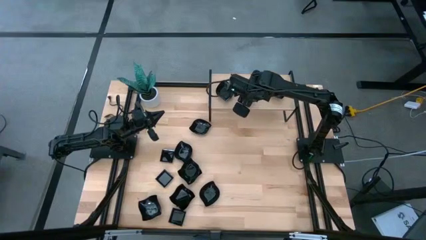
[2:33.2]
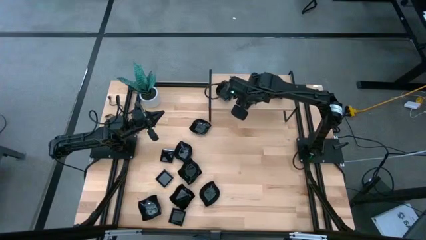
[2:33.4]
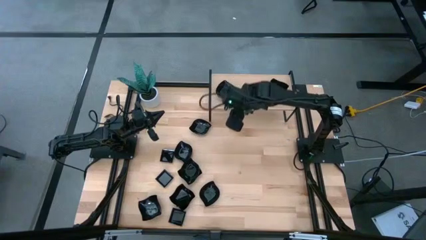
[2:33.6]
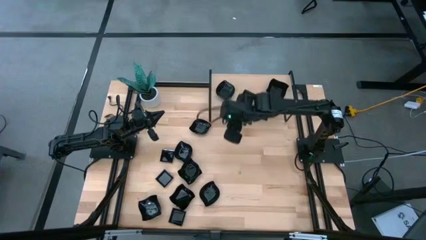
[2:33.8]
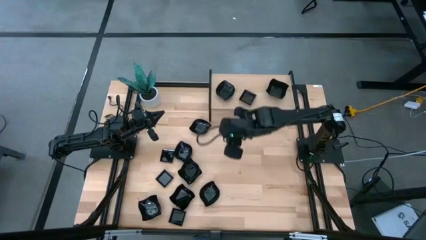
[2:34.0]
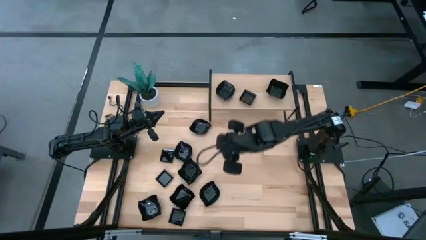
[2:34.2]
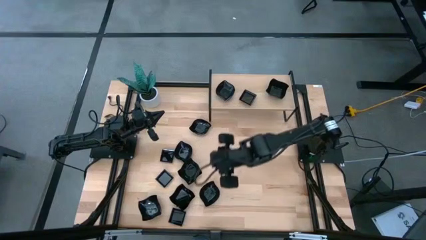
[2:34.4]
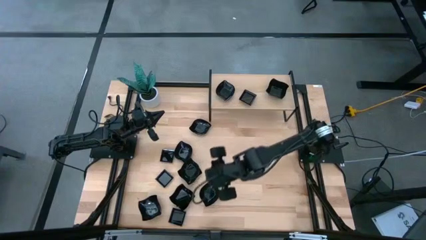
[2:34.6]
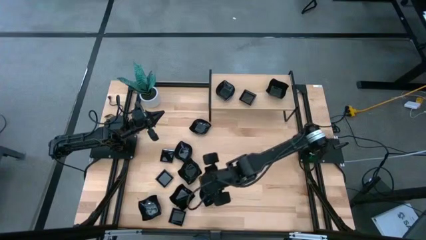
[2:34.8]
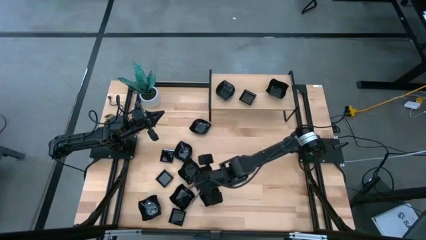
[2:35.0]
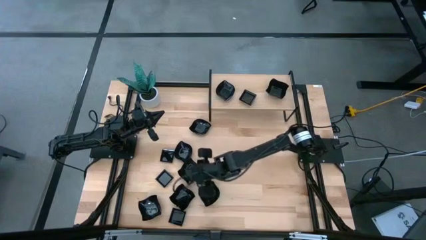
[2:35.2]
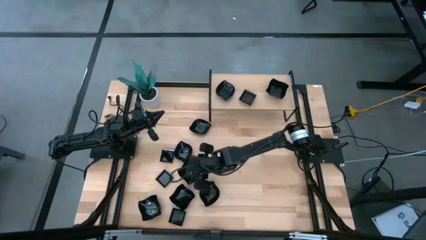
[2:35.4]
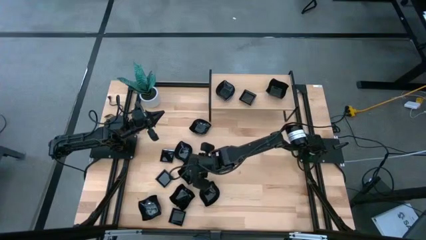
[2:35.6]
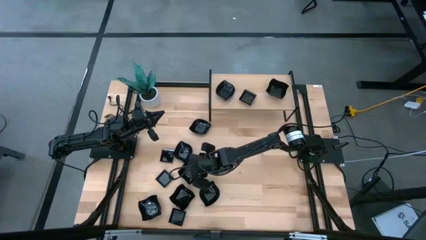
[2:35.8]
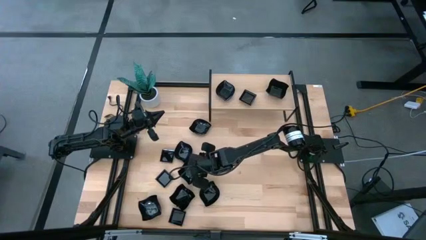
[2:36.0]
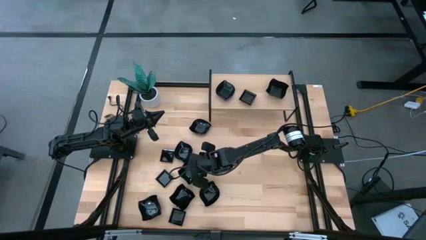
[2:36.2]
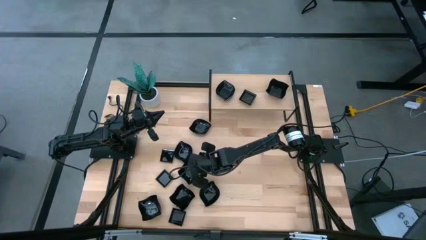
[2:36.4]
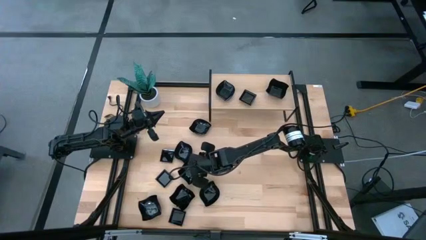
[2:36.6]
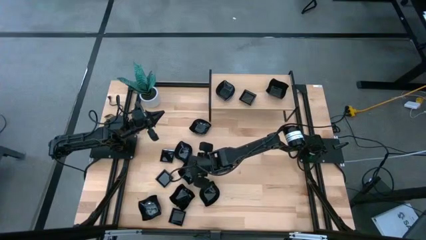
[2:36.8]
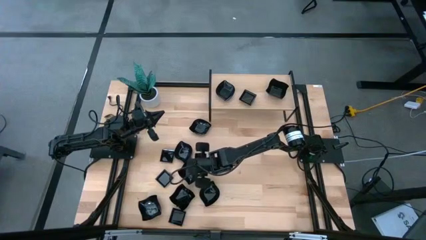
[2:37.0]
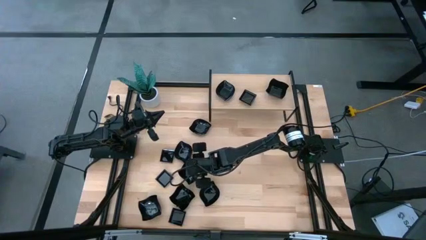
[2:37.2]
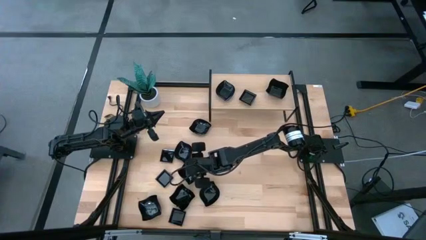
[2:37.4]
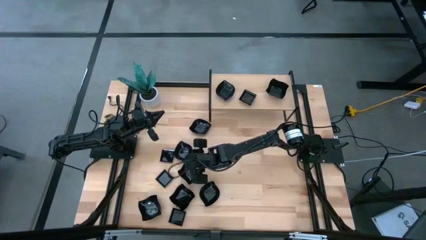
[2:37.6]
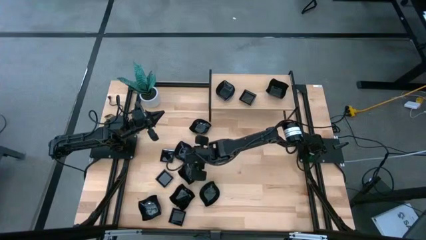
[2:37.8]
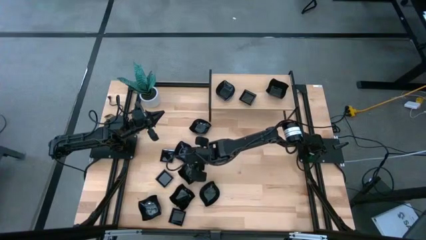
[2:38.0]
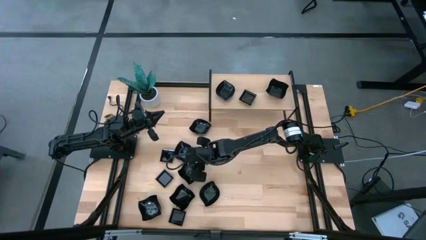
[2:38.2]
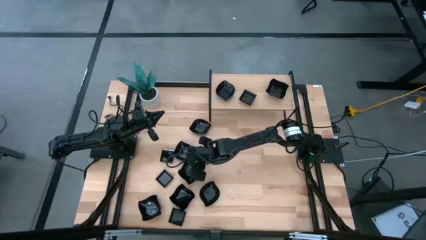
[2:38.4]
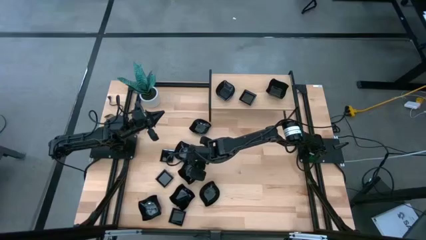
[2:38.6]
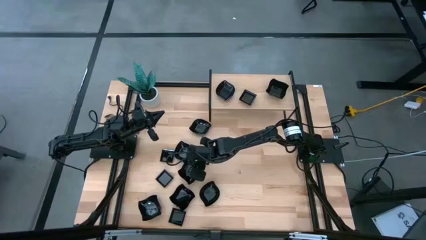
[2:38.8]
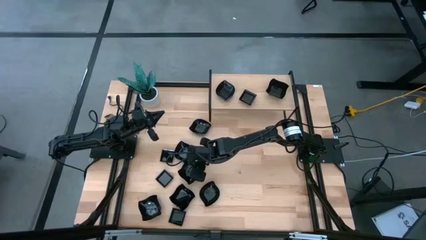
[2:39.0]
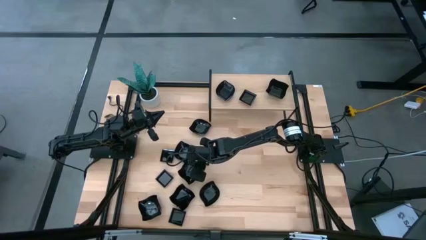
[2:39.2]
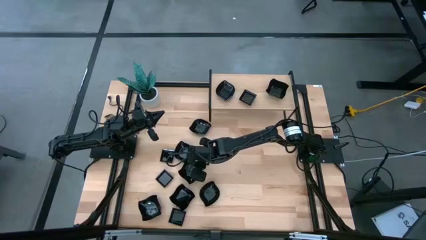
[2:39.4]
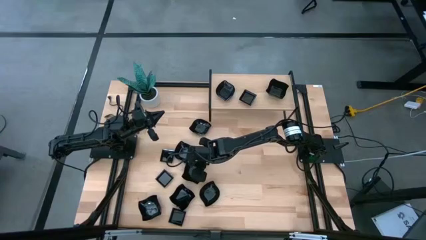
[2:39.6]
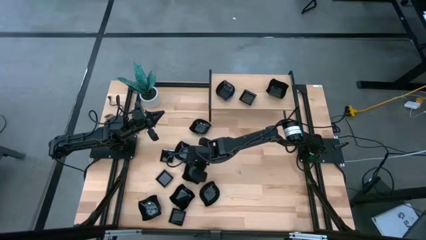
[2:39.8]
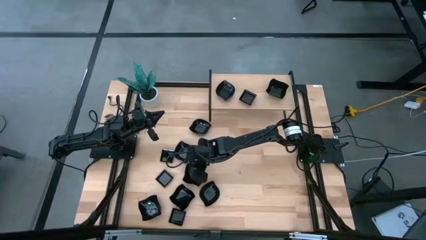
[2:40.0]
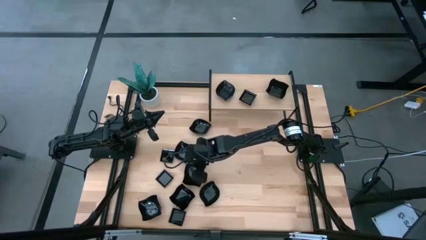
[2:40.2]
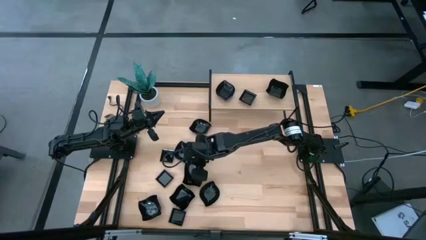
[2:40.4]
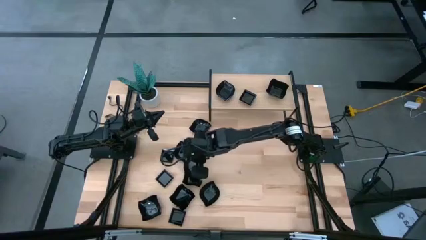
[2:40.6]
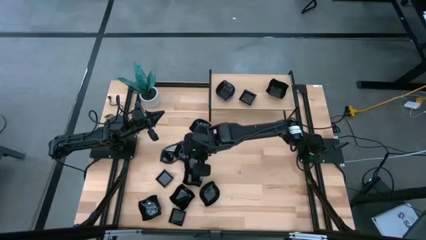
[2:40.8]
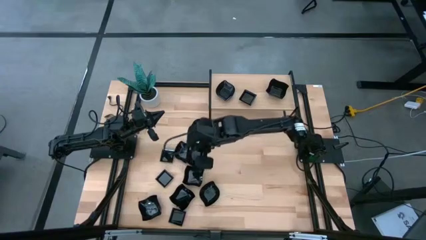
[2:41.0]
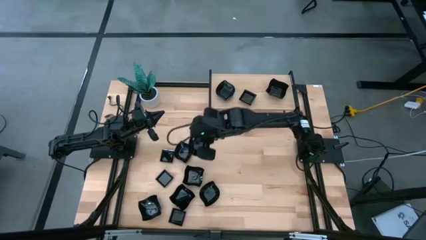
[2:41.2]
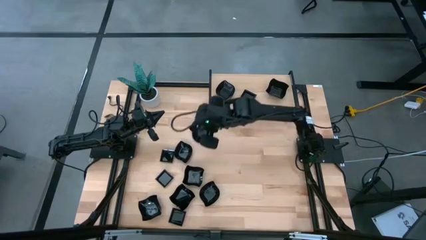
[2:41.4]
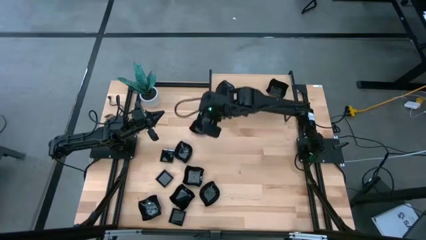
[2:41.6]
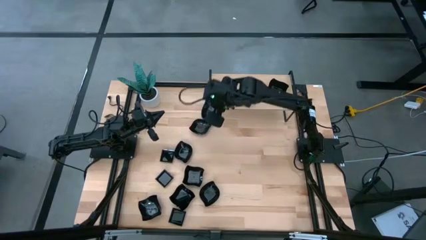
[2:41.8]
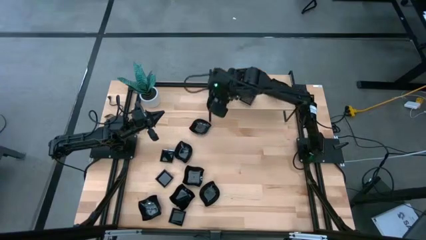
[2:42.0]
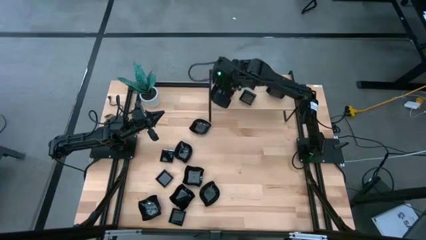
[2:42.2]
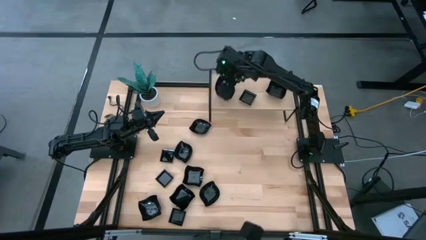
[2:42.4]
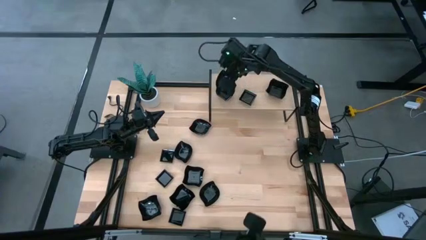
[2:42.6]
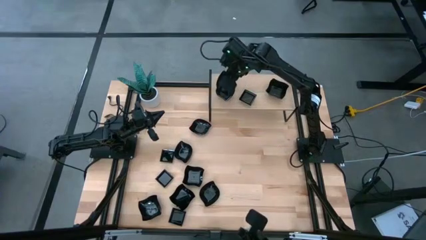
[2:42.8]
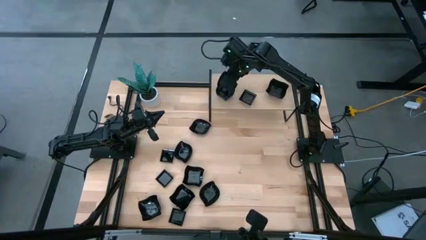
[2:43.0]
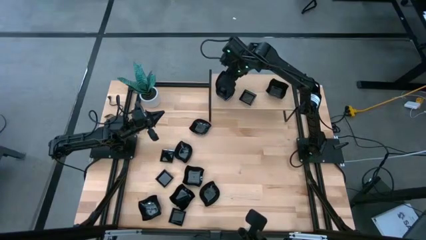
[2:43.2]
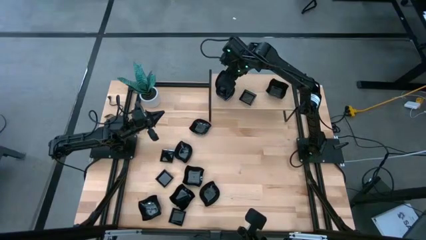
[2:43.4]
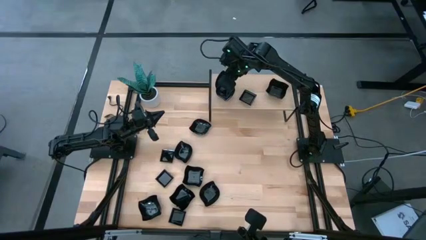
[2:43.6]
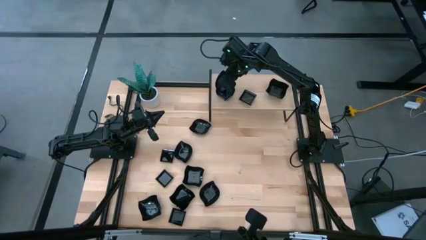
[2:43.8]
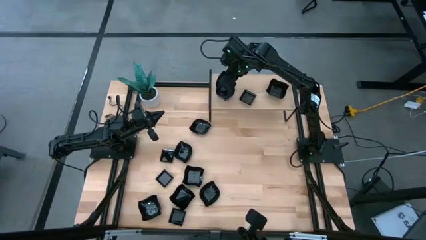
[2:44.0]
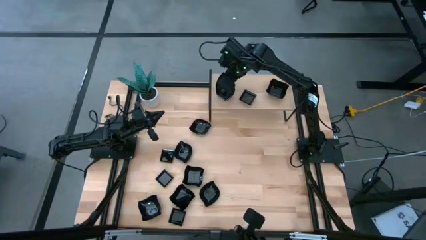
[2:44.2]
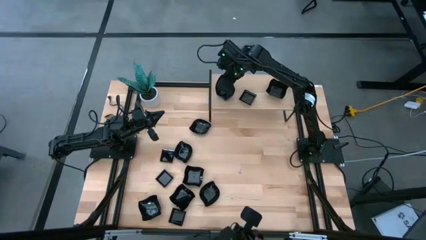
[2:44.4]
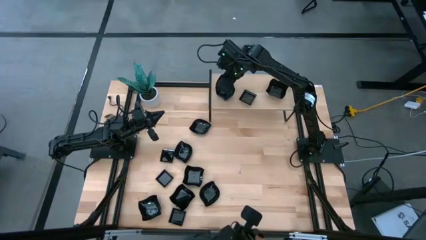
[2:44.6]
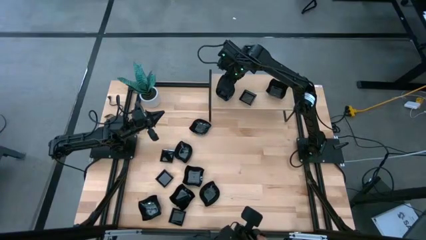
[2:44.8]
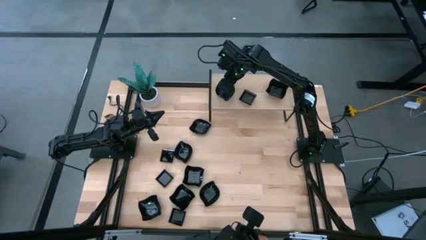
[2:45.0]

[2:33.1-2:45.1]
Task: Pick & Place Mini shaped plates
Stack the black leaf-shaped plate on top of the black leaf-shaped plate on the shelf

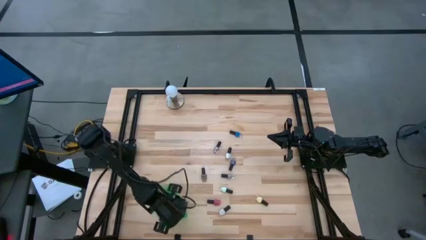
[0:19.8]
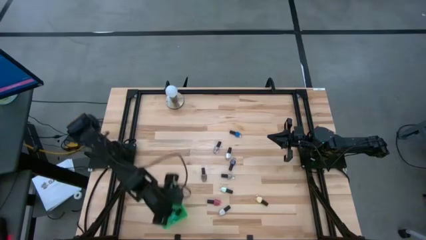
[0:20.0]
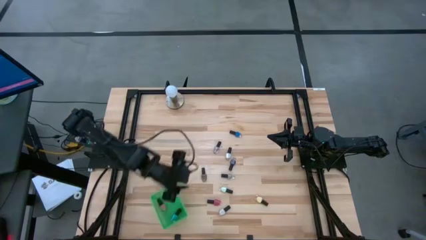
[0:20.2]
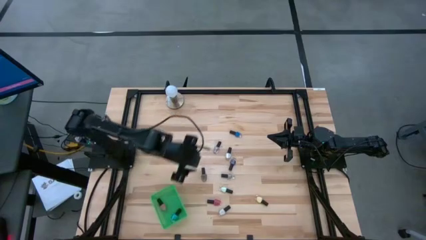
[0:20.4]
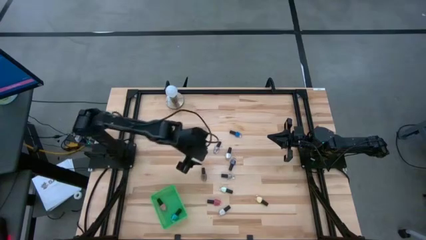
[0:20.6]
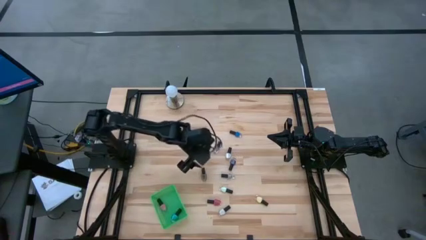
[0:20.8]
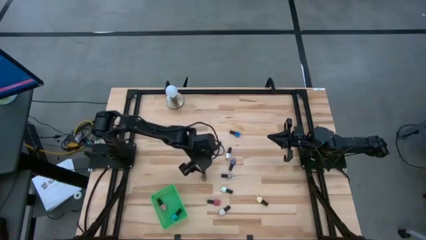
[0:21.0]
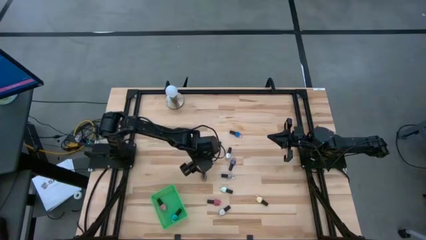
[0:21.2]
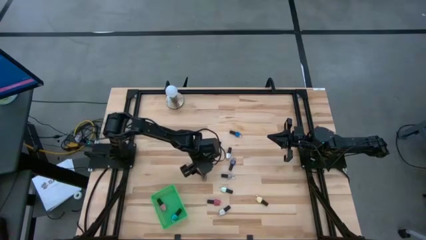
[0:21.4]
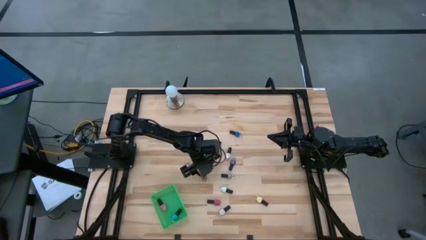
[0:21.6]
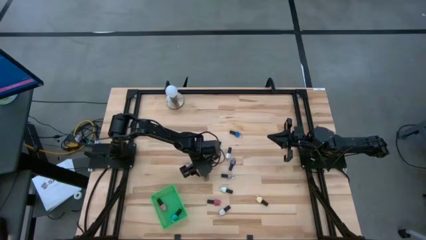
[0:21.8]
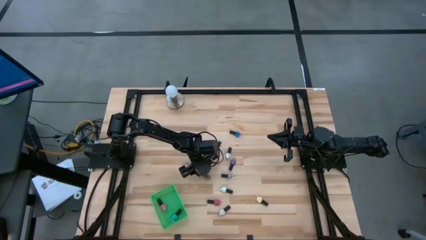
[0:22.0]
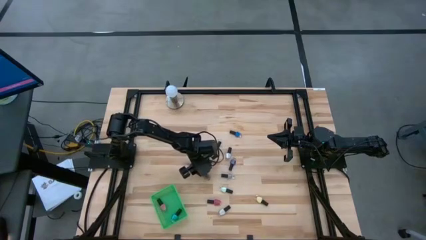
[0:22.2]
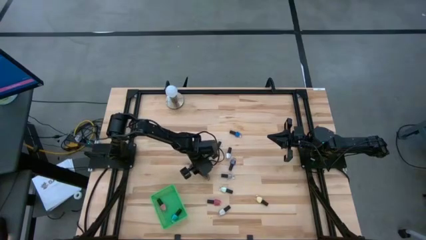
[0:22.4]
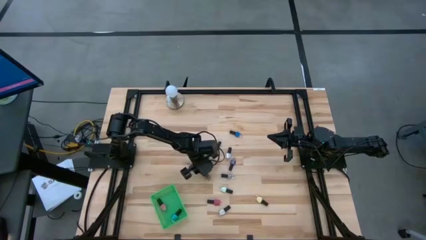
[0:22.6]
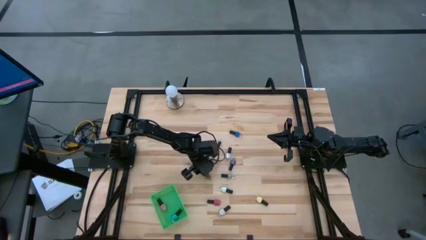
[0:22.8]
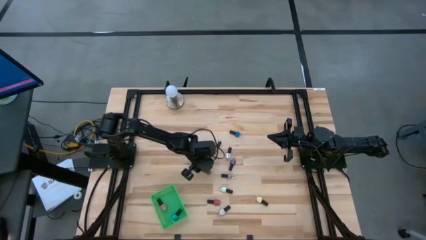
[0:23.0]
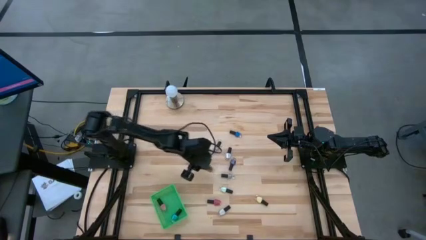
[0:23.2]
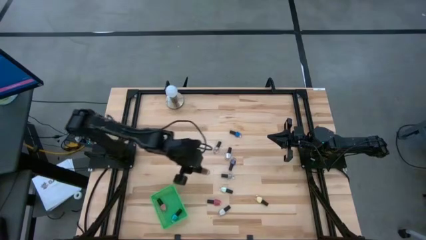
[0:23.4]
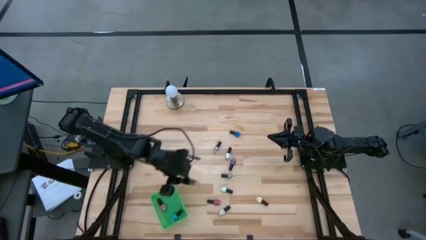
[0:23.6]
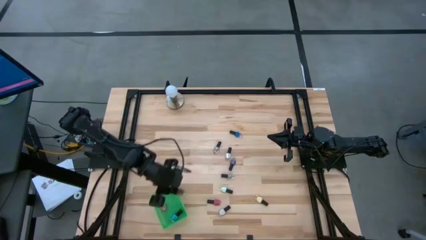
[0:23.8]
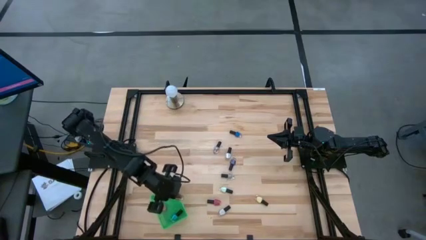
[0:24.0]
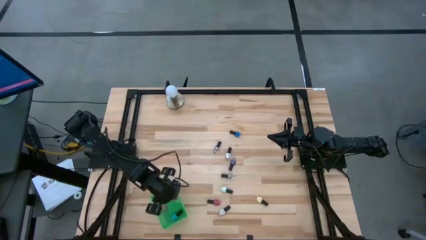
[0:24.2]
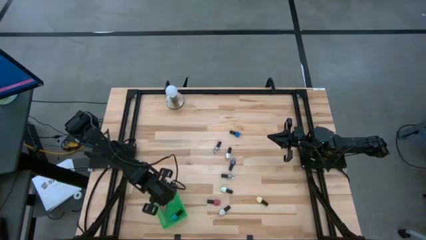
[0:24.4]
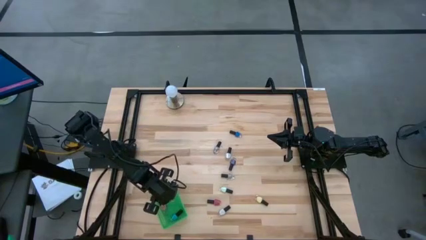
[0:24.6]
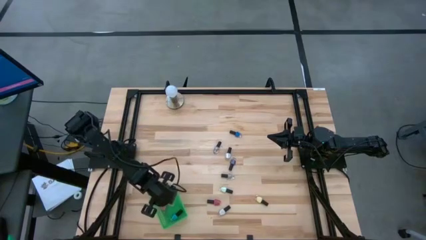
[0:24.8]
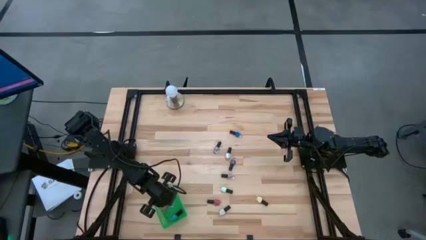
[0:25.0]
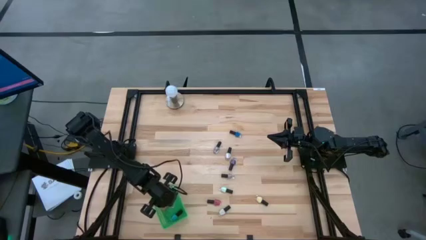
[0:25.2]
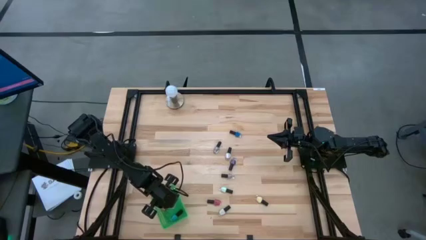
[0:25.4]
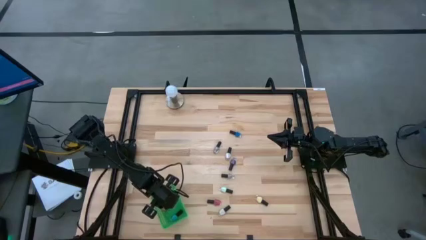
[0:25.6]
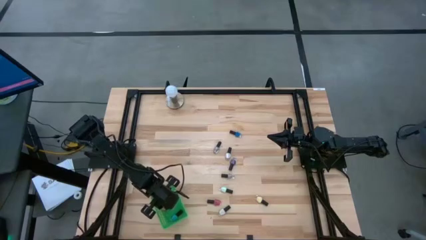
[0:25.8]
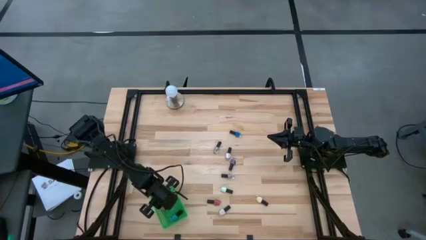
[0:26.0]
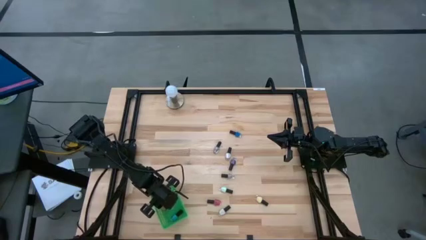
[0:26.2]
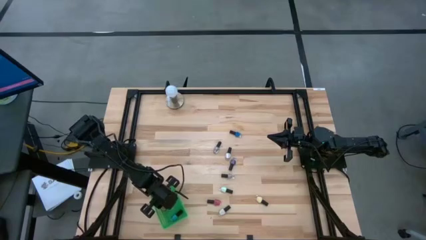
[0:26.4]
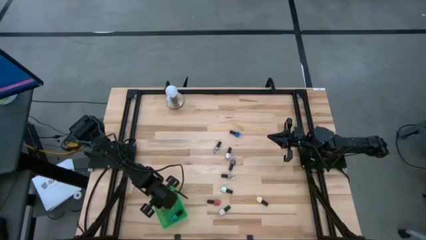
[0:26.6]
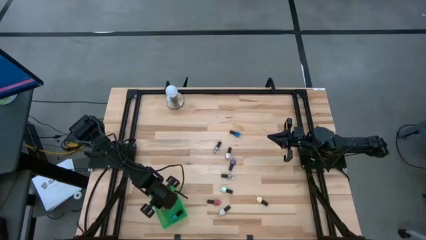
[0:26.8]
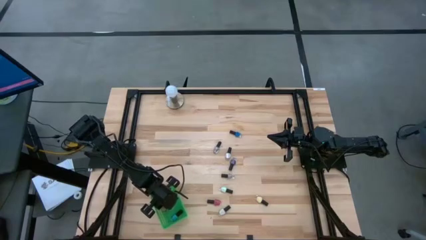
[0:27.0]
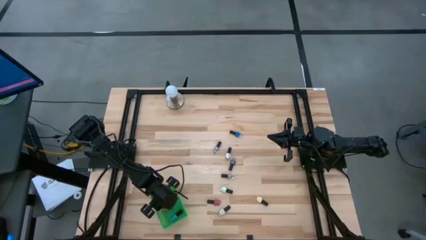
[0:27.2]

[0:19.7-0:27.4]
Task: Pick & Place Nail Polish
Put the black brown nail polish bottle into the green basket
